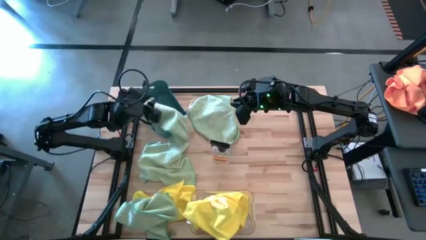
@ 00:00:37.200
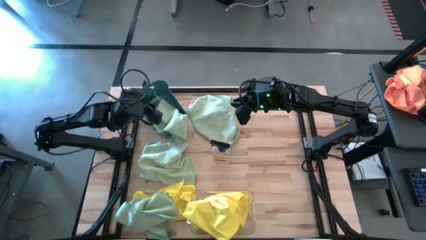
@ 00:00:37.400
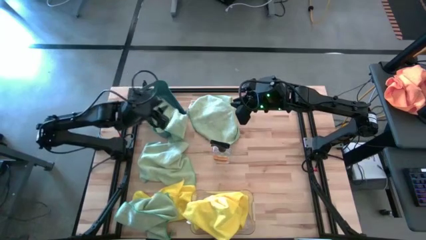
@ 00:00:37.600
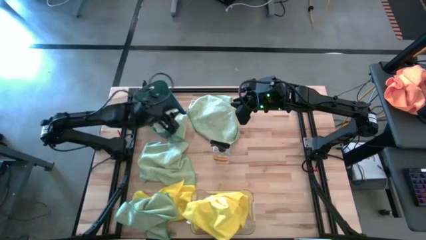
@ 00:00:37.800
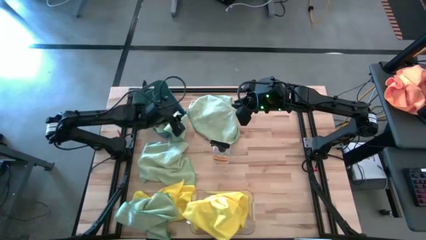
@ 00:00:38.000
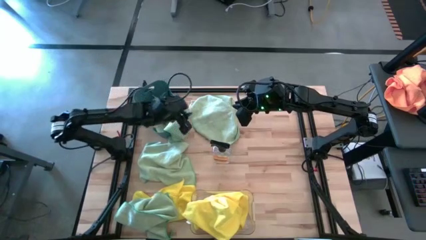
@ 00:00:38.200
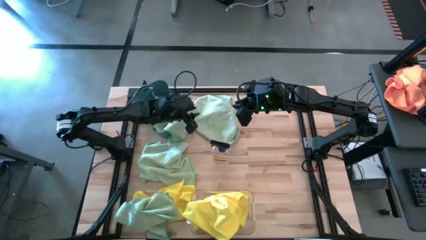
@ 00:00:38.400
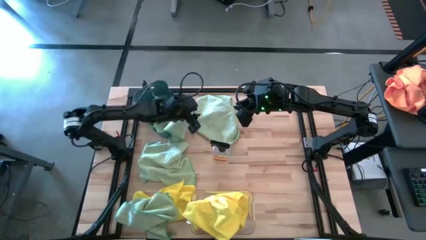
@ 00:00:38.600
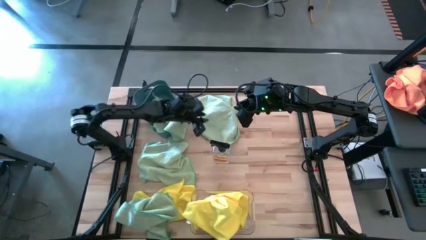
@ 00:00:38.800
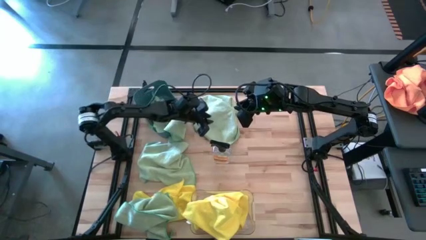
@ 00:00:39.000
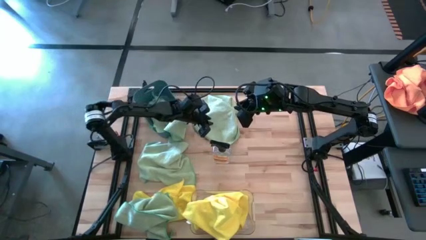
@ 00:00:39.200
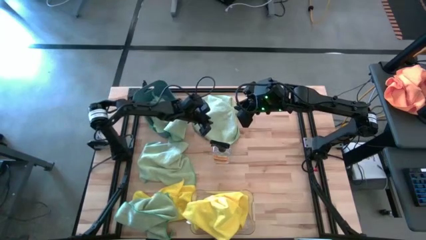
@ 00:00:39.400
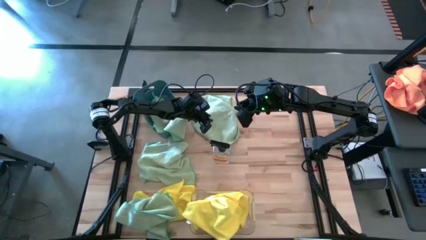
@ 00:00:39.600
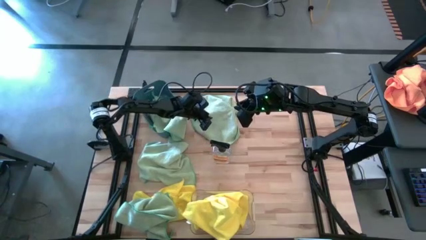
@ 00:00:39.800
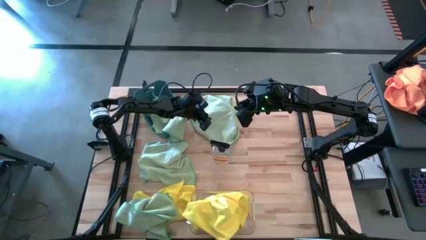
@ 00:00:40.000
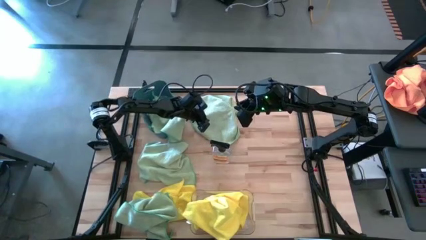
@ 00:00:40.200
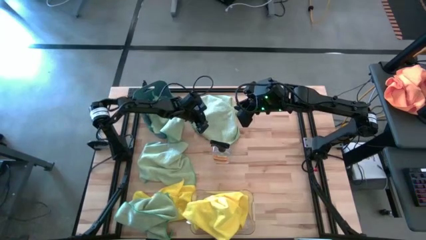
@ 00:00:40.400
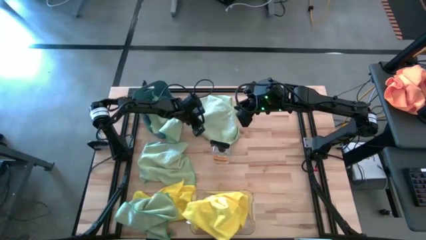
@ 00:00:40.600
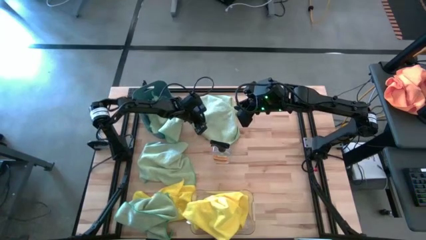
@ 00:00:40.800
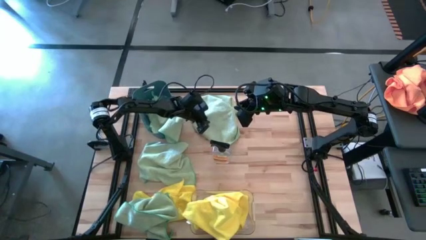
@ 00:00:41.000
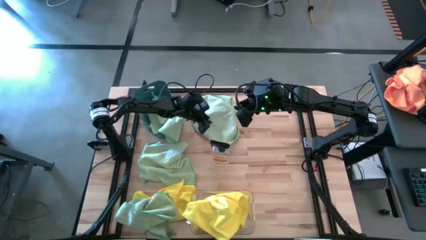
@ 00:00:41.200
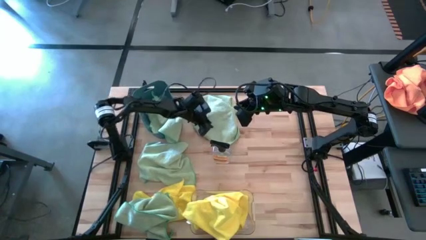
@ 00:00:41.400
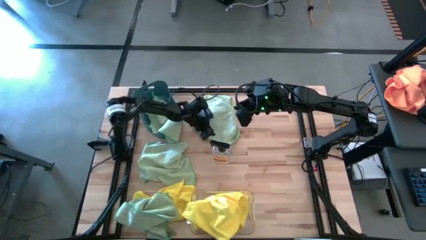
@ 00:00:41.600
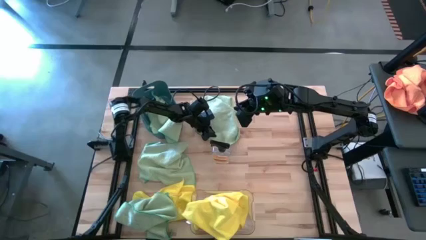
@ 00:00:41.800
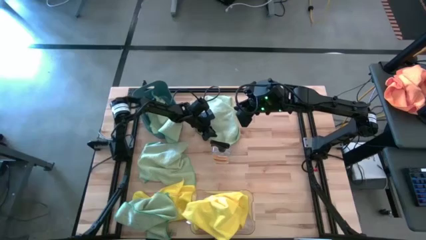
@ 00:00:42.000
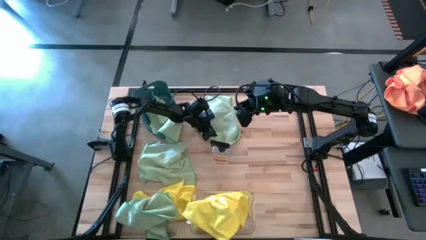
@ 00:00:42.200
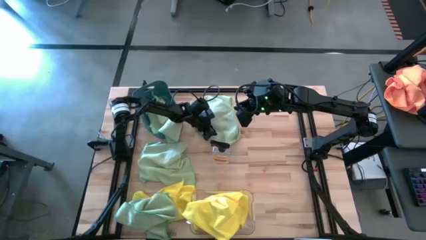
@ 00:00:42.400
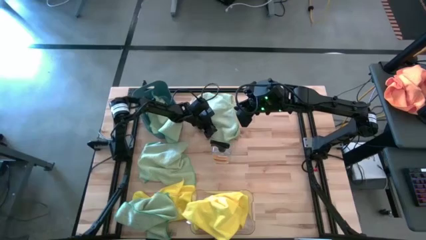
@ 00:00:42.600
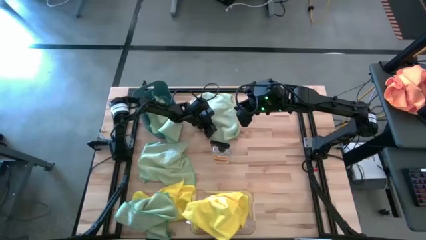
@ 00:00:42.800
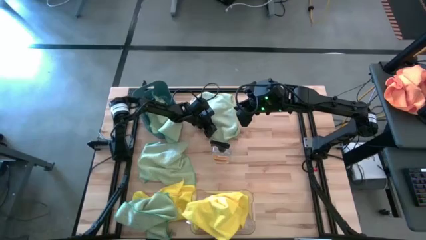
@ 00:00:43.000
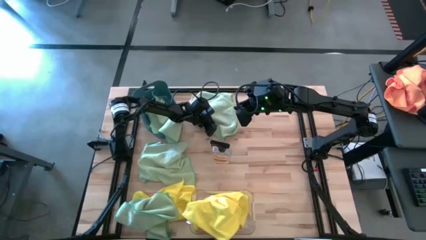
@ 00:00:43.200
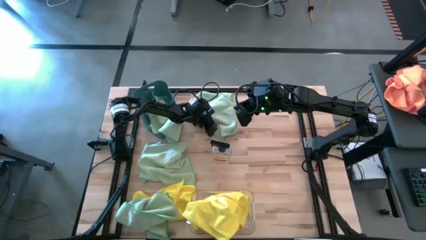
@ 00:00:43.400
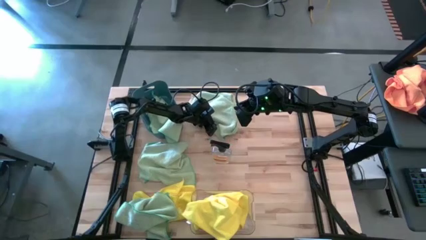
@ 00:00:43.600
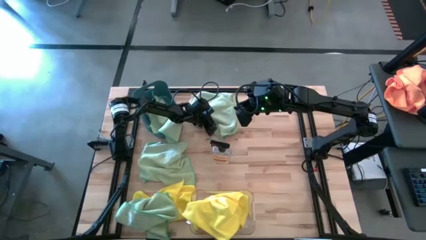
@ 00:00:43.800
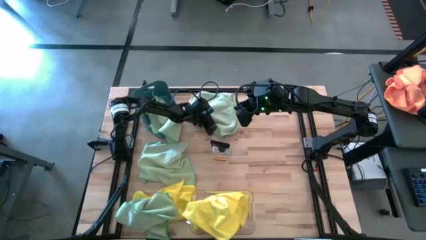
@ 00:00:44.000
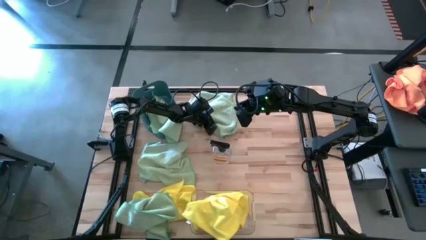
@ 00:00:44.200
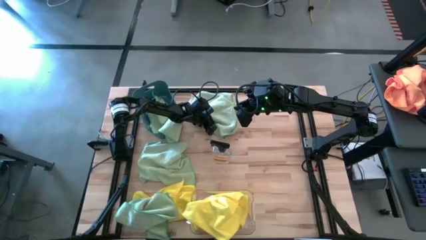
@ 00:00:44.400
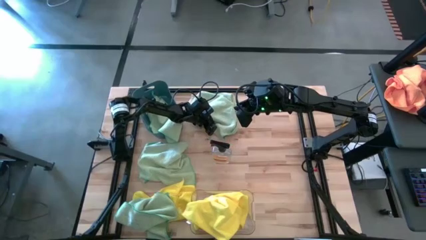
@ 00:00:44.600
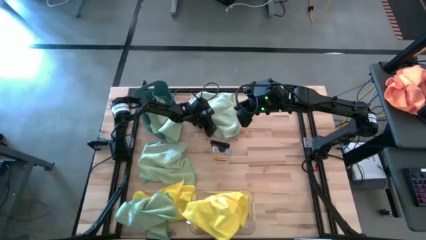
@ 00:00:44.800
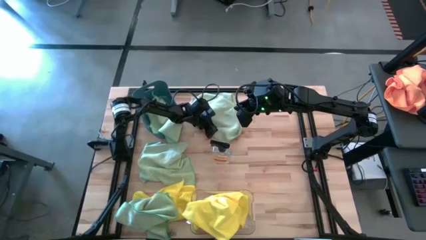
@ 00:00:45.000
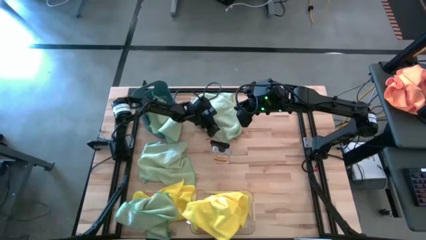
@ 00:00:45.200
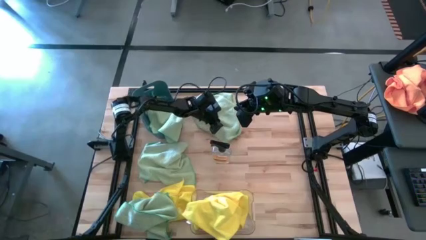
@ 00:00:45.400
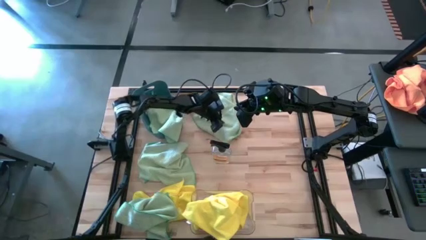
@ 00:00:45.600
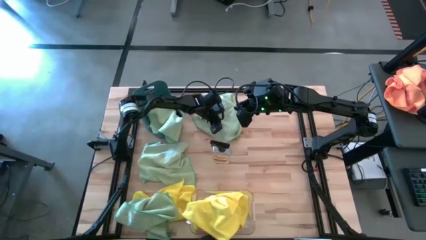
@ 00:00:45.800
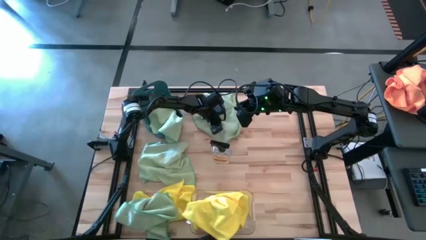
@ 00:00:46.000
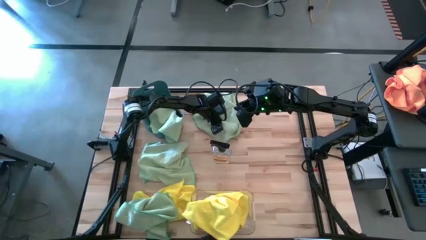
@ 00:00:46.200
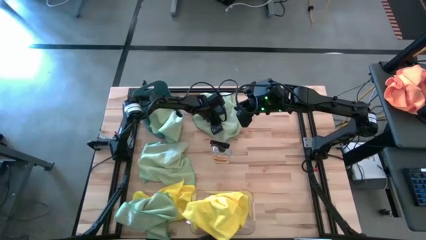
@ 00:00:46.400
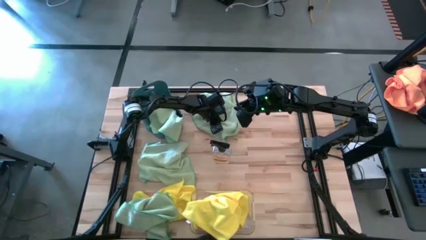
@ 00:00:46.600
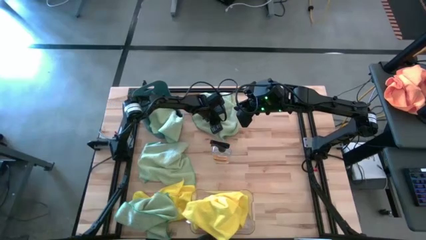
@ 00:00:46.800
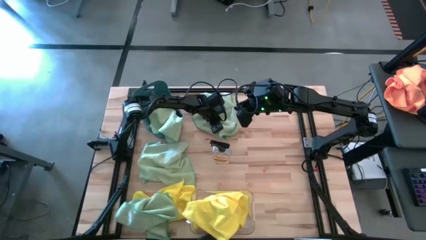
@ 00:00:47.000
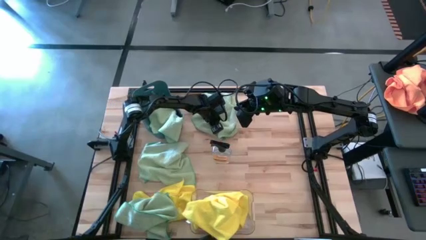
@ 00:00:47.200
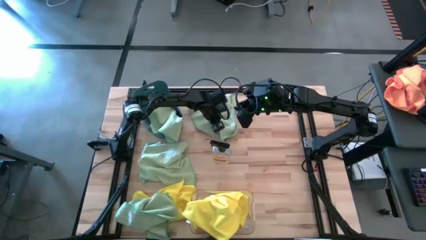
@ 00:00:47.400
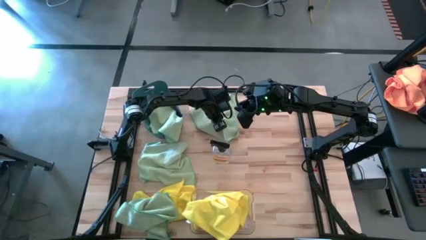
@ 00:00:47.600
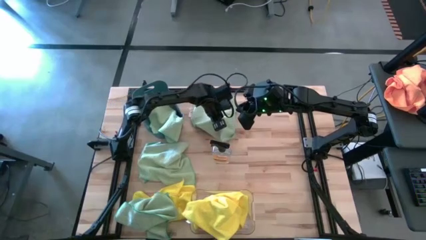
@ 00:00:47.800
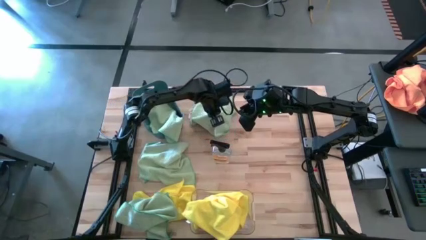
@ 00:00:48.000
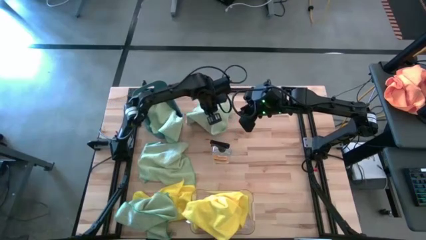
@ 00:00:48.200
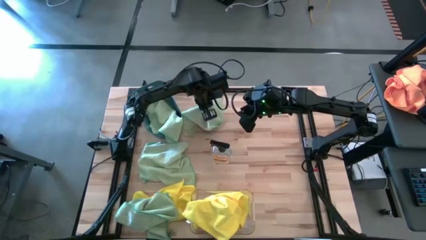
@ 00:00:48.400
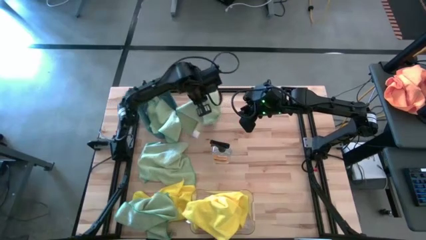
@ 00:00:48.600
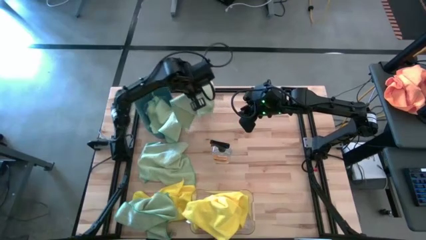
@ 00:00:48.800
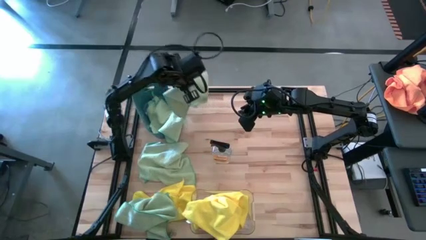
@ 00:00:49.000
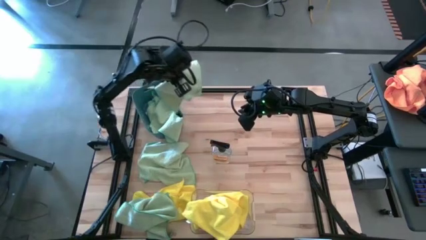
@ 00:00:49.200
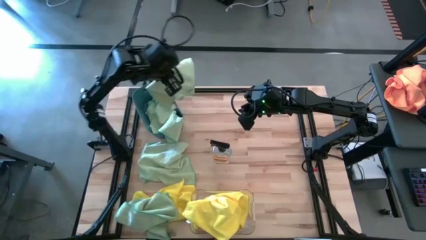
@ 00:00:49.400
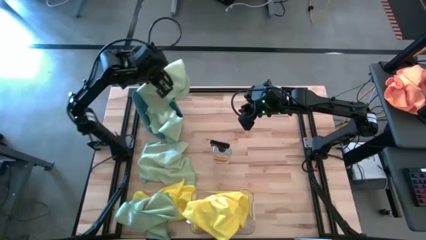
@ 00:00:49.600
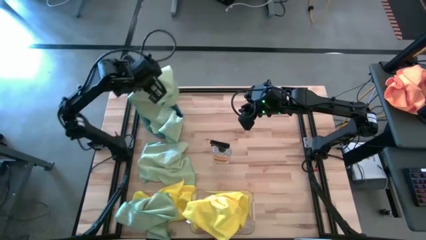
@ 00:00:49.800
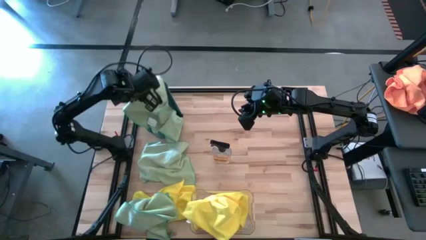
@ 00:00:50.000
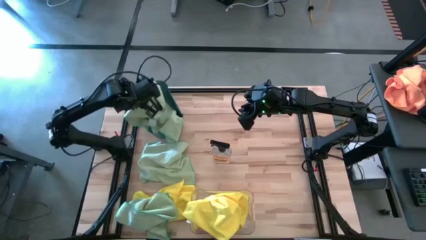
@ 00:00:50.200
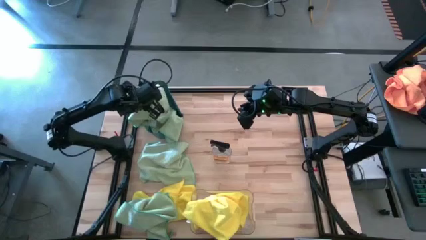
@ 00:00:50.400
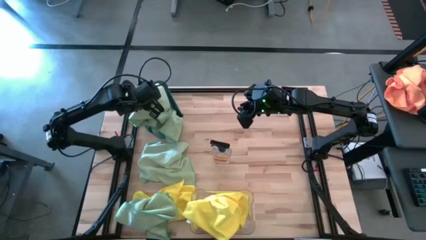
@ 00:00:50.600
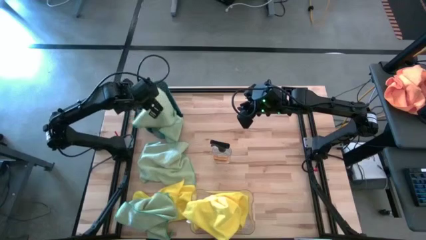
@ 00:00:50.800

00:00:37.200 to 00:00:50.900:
Task: Sort microfiber towel by color & place in baskets
Put the green towel into the green bin

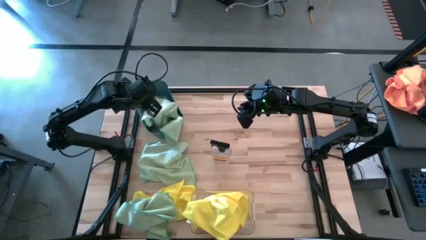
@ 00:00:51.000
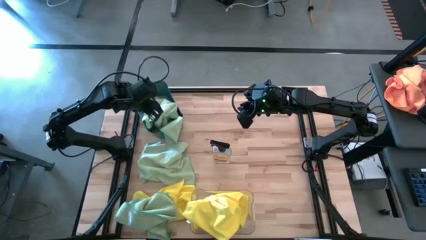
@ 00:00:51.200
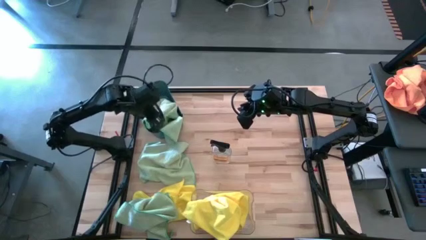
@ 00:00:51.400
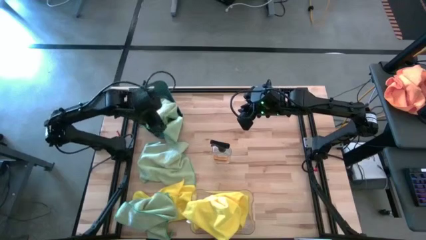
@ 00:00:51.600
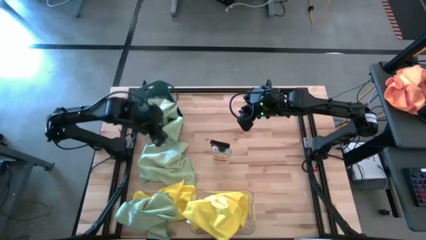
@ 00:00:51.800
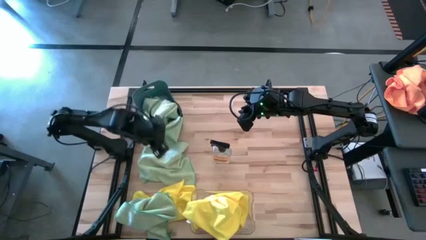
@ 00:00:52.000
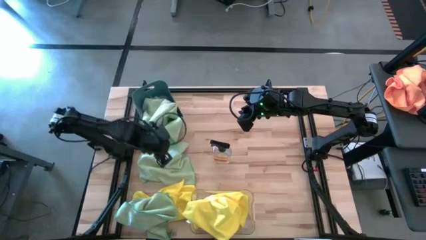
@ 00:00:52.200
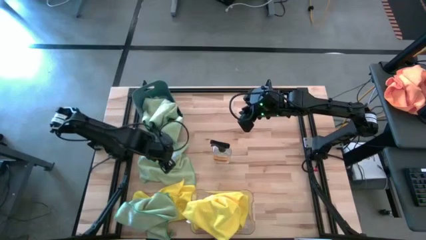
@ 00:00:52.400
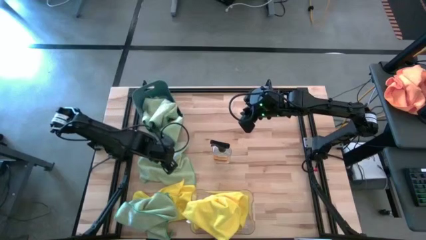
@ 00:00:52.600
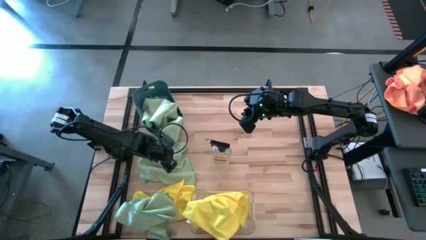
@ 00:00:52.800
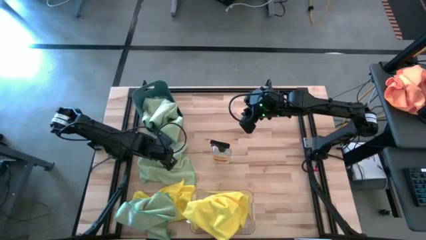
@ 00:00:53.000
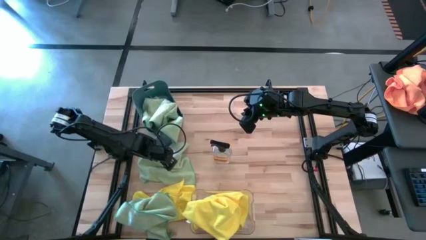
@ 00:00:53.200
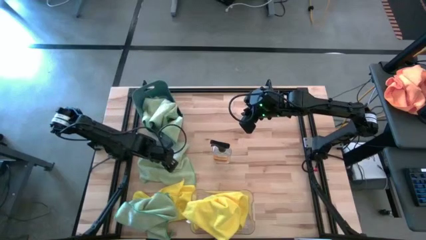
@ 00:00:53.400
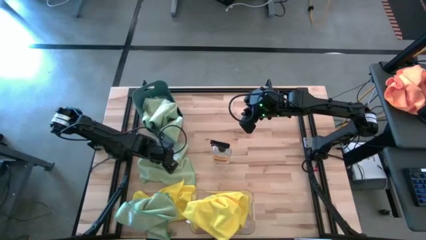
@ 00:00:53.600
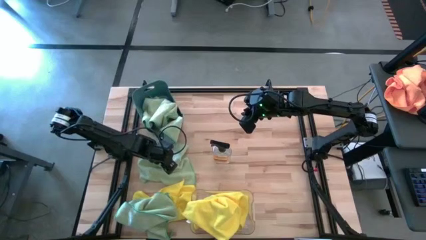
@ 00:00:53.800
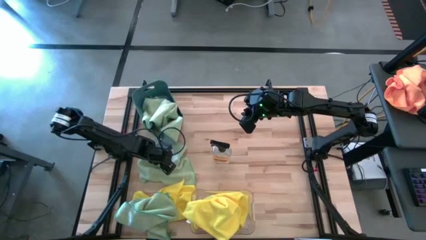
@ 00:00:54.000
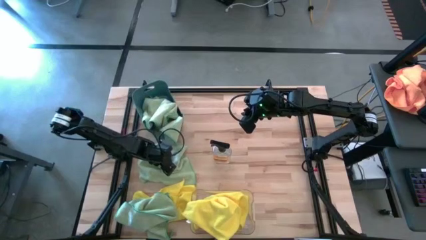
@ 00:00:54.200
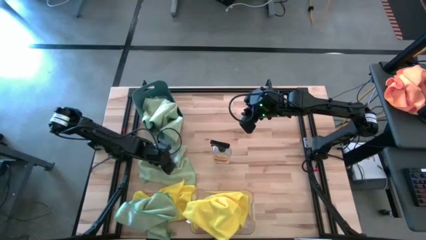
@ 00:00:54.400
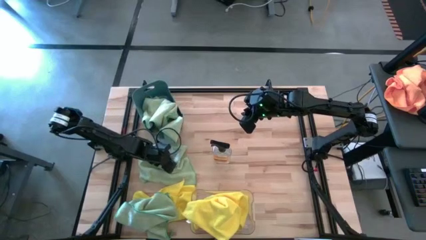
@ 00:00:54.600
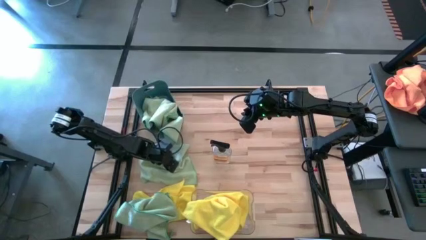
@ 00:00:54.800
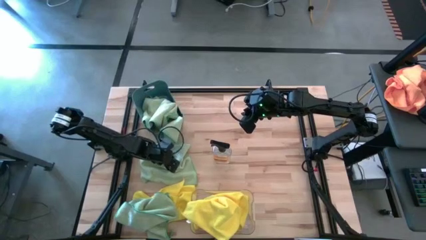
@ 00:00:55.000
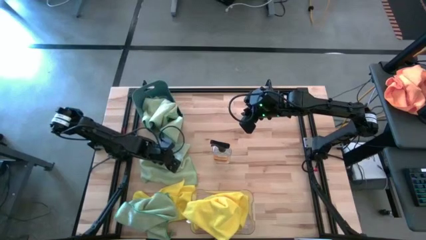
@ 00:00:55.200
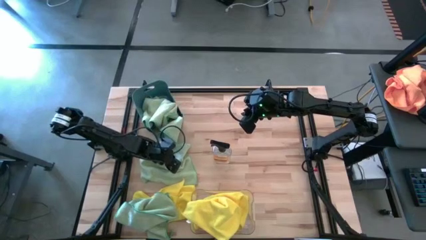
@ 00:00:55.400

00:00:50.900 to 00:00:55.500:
Put the green towel into the green bin
